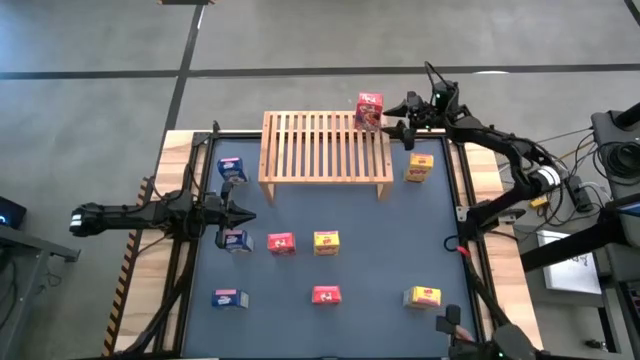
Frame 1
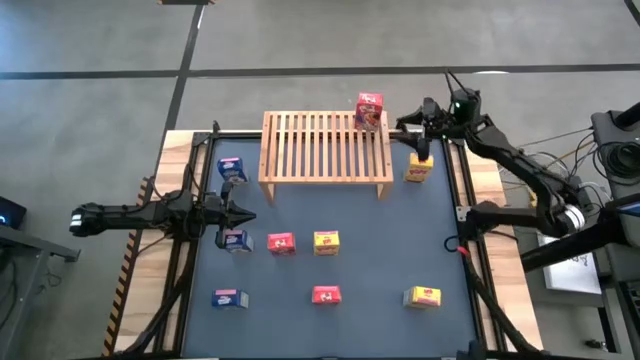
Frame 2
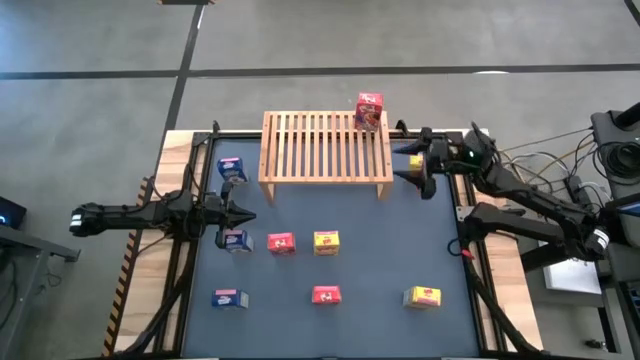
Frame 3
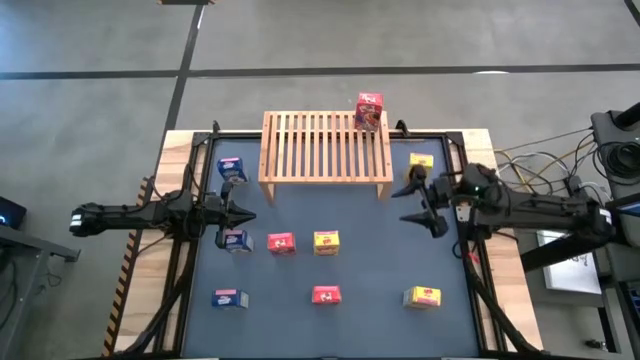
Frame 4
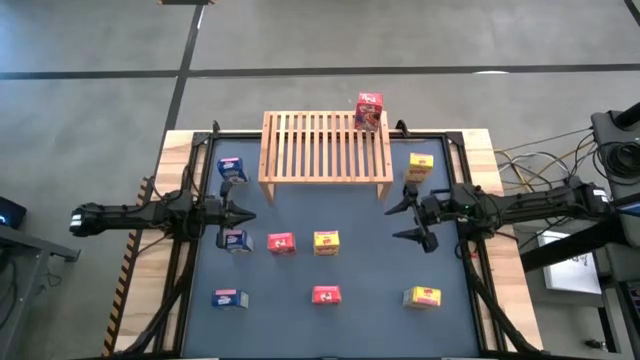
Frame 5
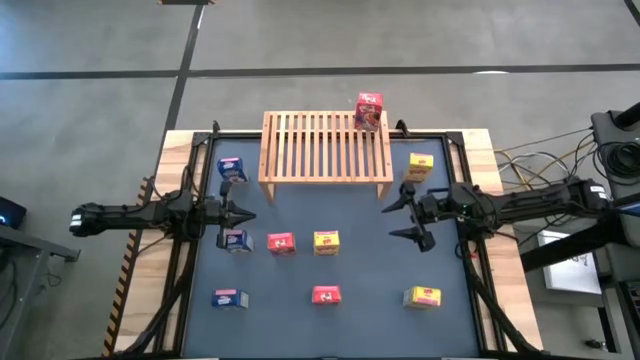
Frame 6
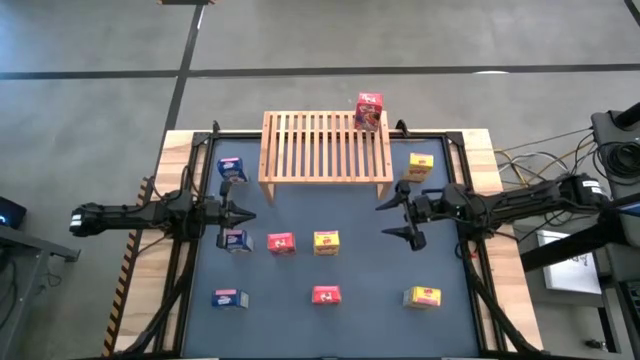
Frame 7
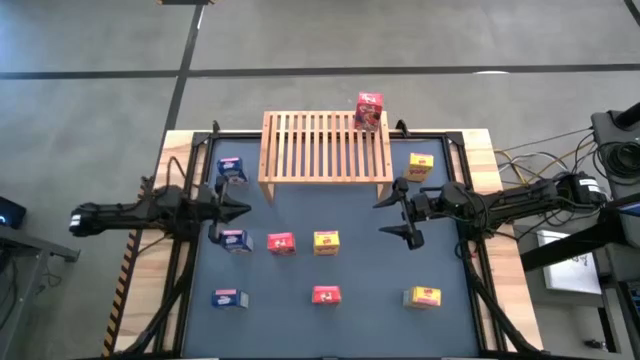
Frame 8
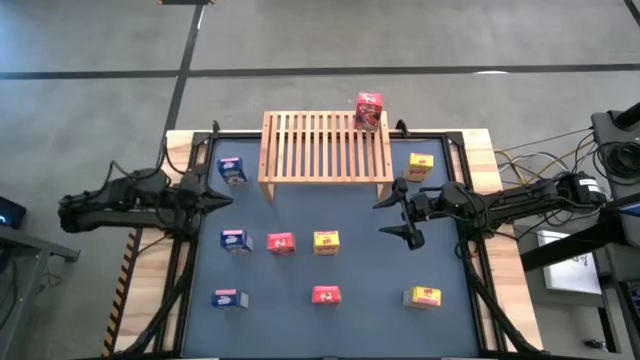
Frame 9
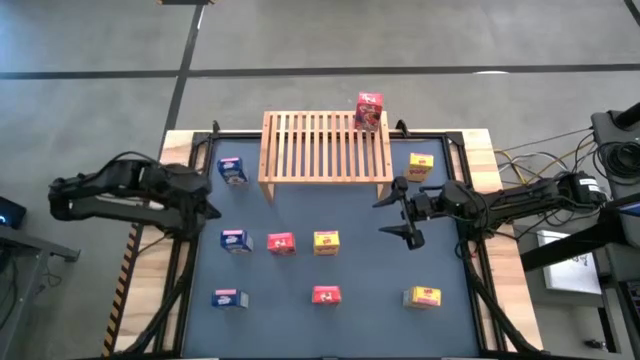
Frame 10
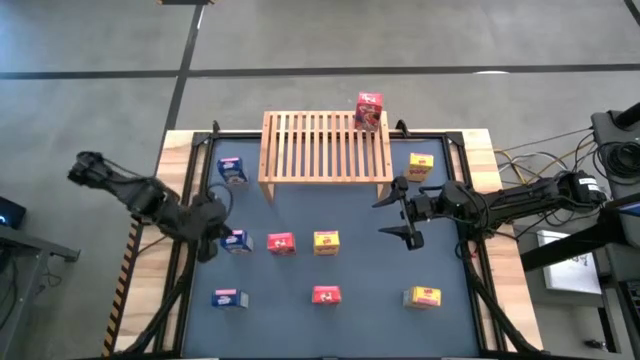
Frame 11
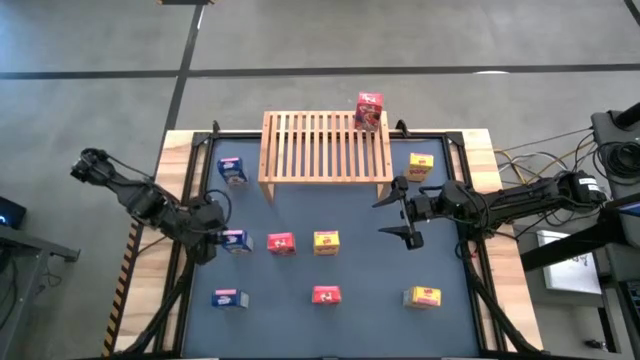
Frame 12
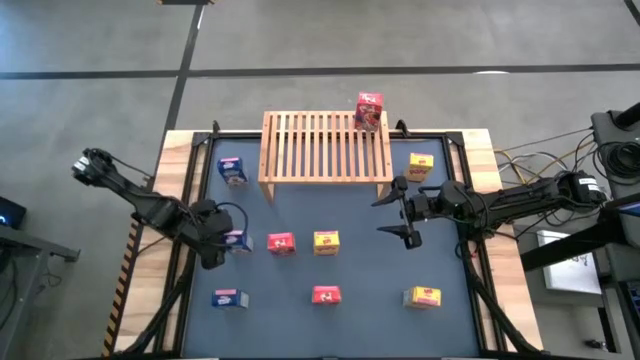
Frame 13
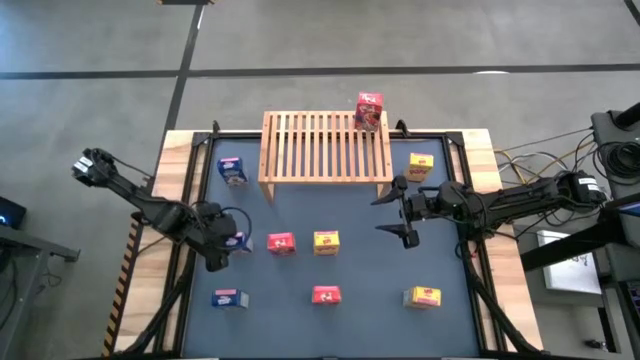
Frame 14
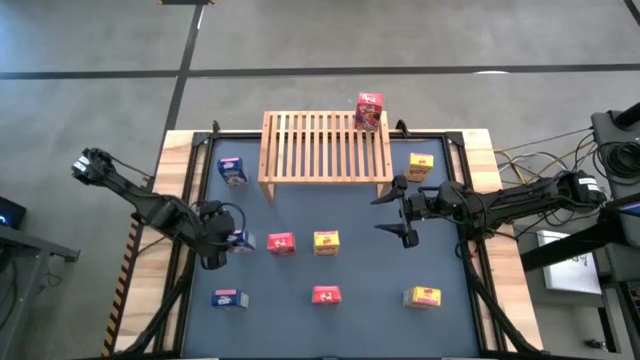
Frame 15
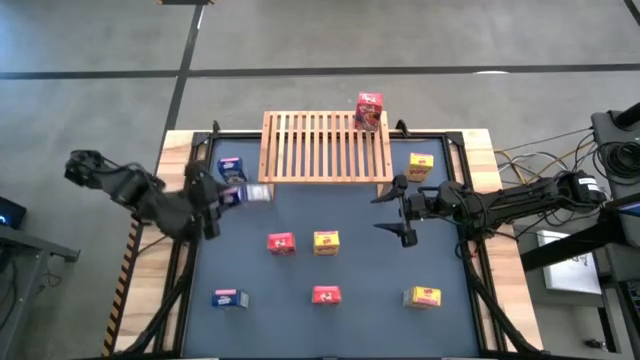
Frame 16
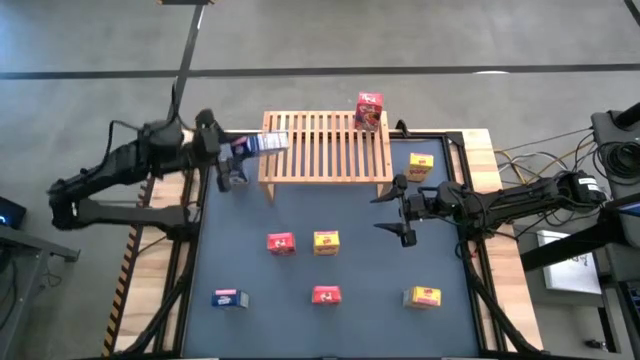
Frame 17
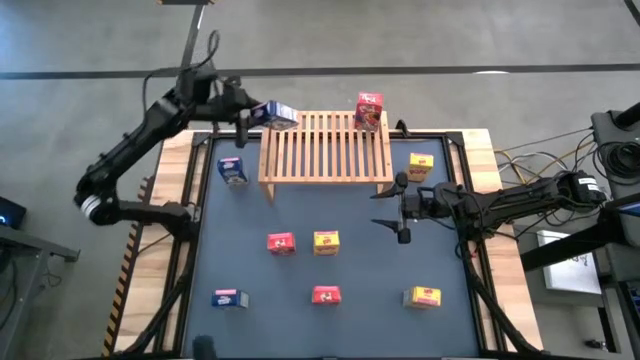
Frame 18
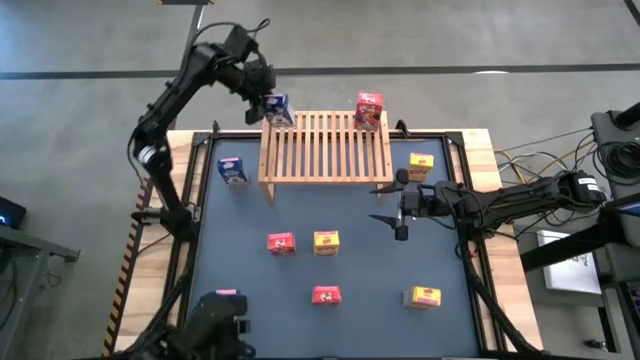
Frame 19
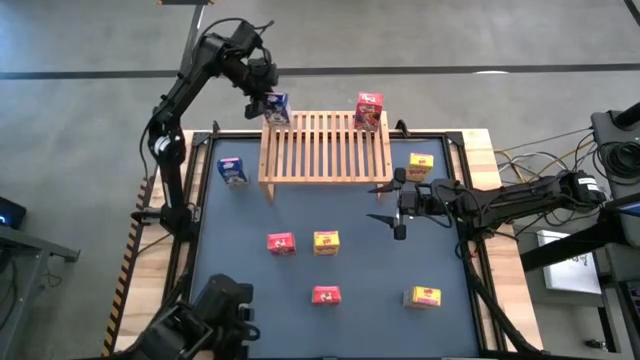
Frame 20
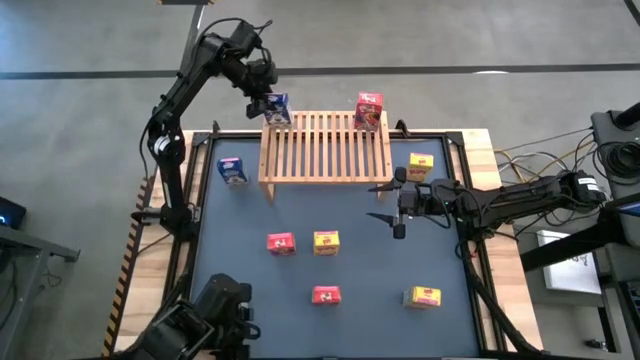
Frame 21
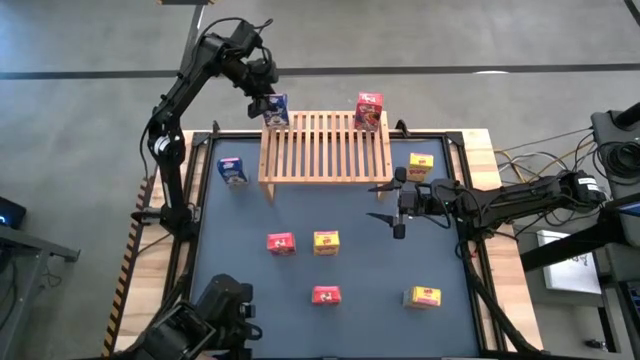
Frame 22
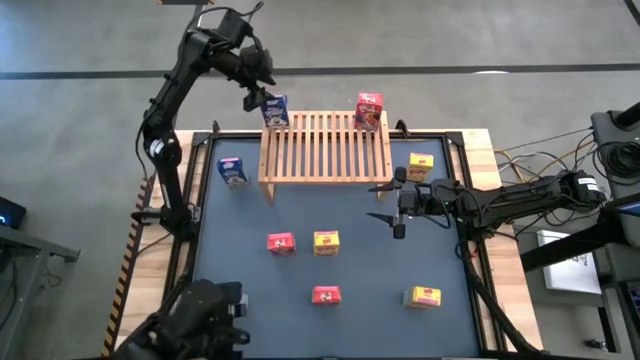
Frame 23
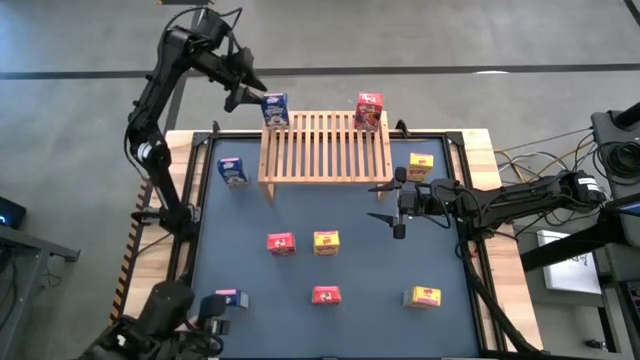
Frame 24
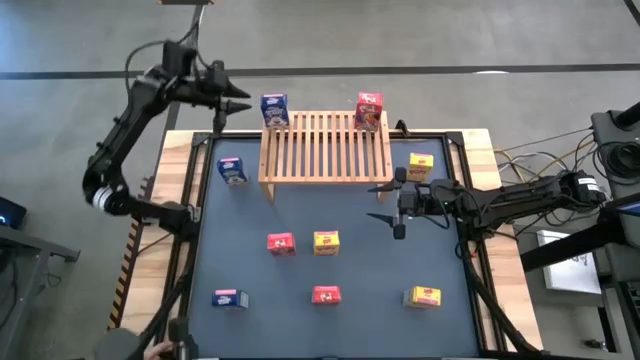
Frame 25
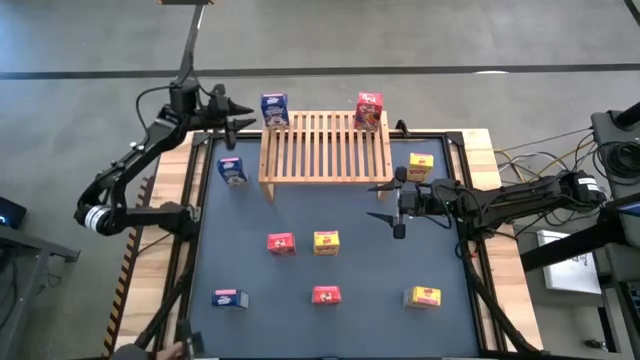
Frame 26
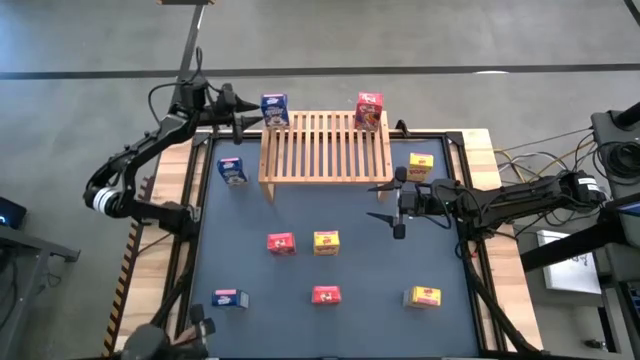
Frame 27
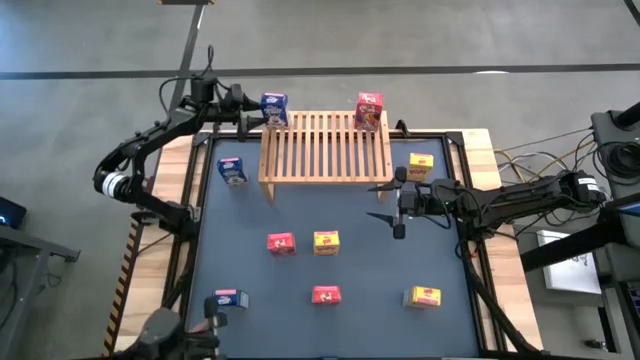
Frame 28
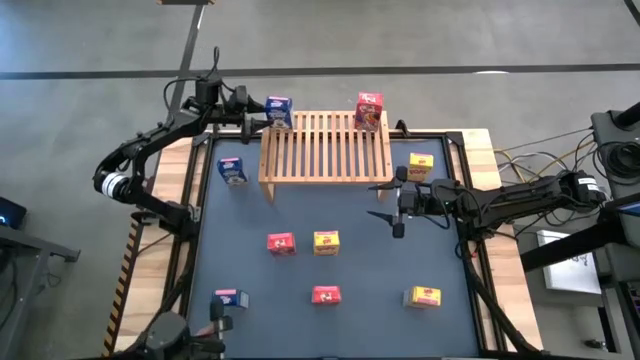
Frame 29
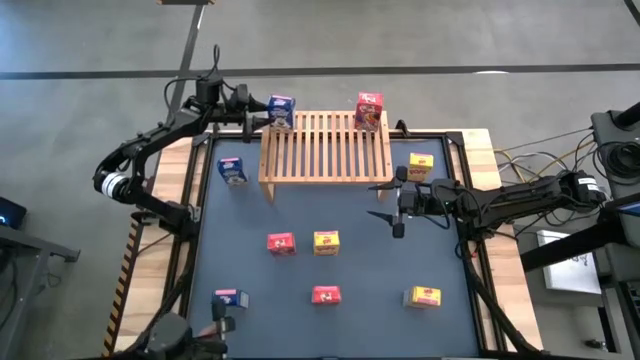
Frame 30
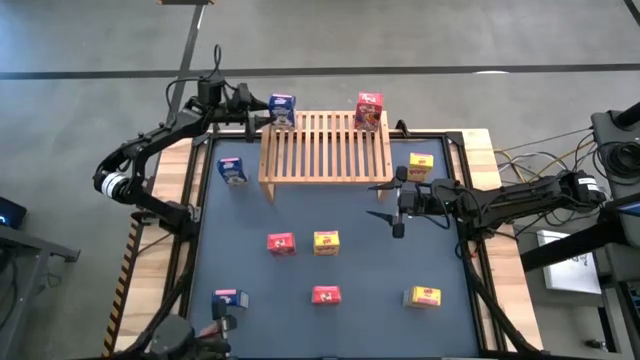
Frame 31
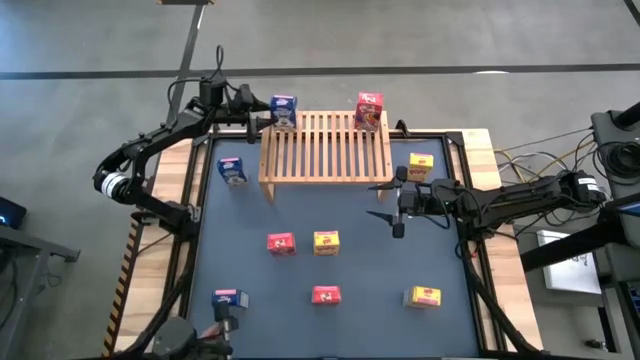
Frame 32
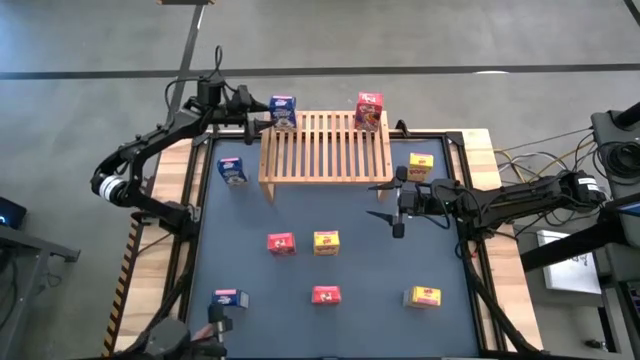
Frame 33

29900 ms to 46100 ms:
Task: Stack cereal on shelf
Put the middle blue cereal box on the shelf

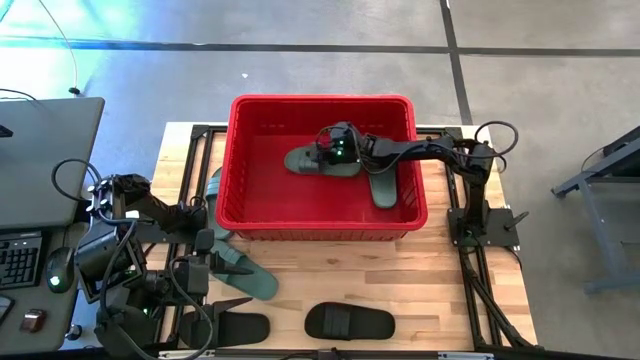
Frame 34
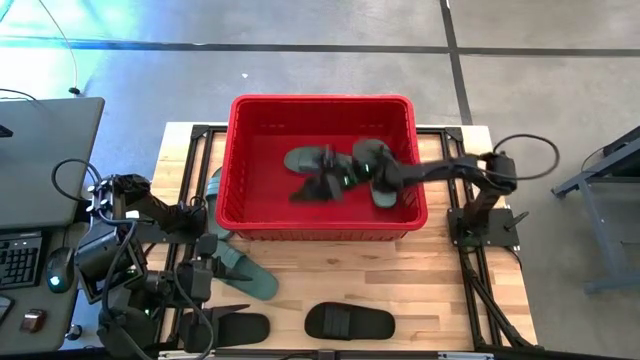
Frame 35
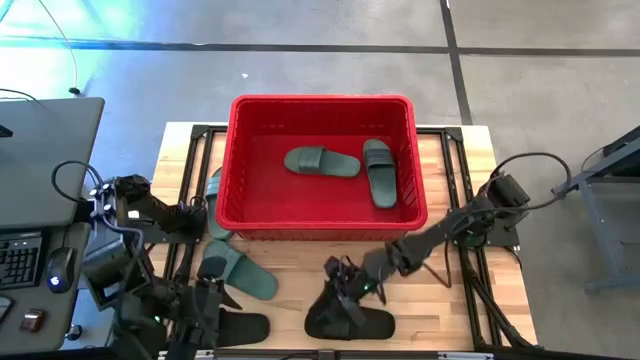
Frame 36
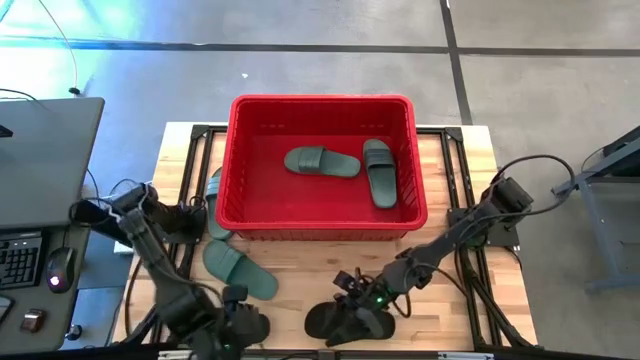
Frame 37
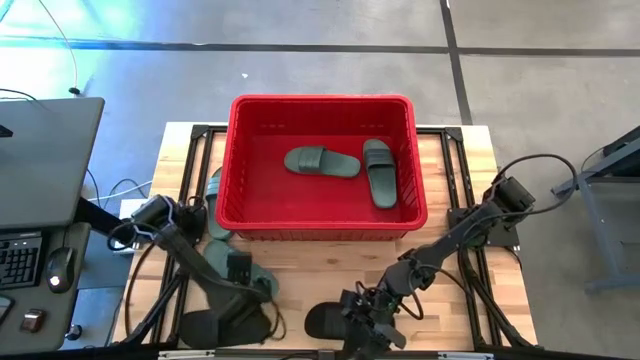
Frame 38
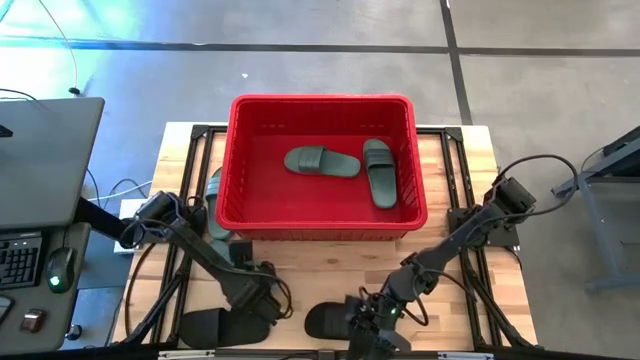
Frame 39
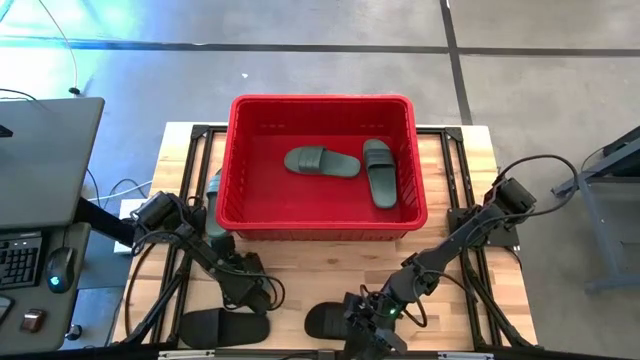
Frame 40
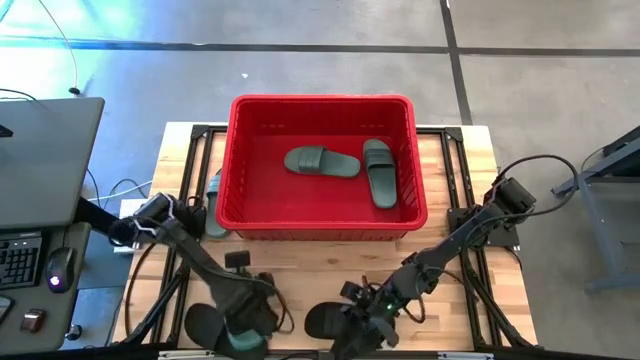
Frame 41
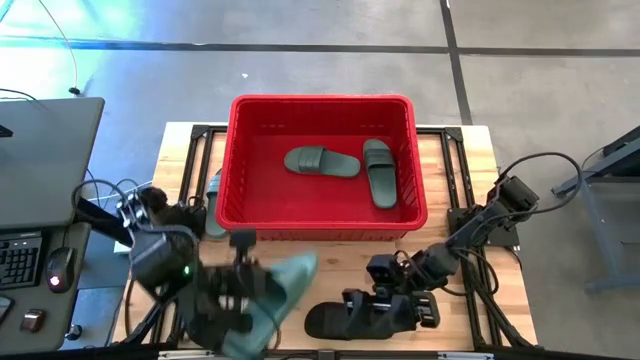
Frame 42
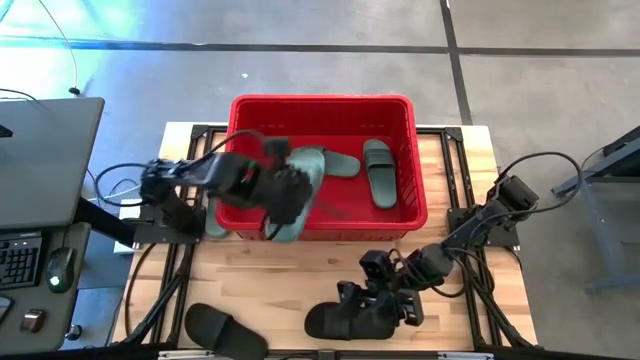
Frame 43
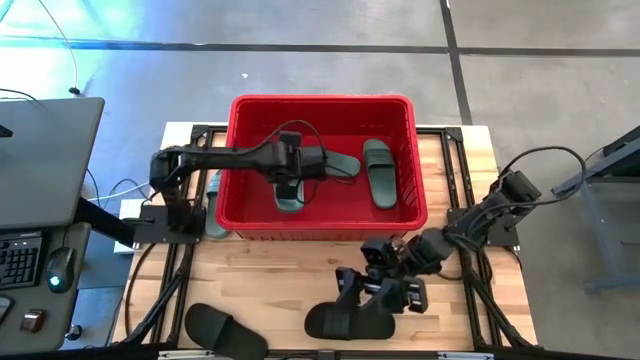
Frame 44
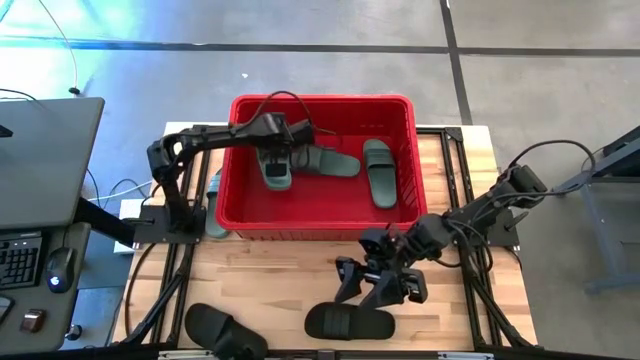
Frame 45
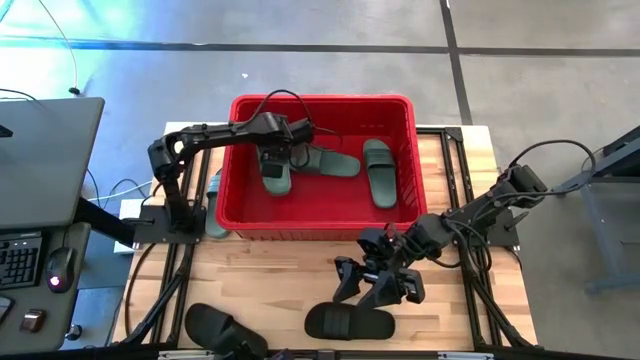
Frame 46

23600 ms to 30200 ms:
Task: Pick and place slides into bin
Put the green slide into the red bin
